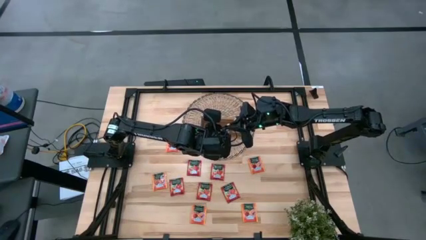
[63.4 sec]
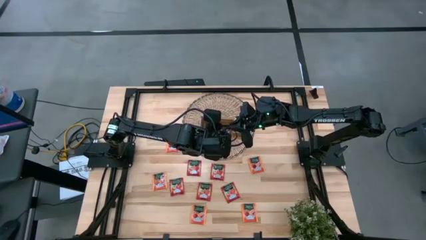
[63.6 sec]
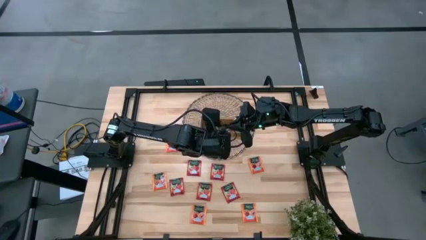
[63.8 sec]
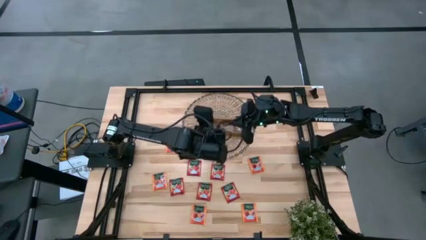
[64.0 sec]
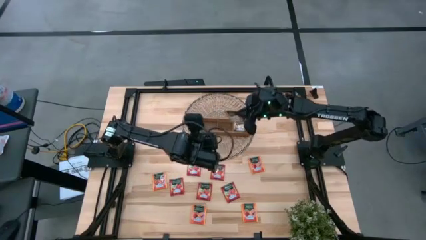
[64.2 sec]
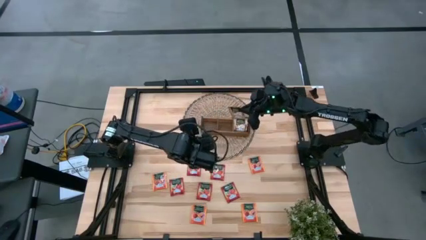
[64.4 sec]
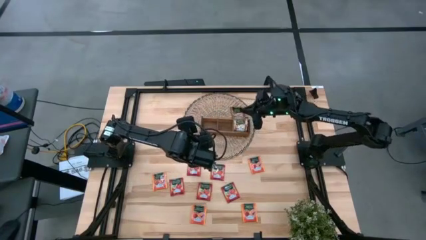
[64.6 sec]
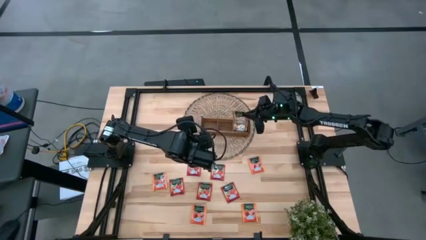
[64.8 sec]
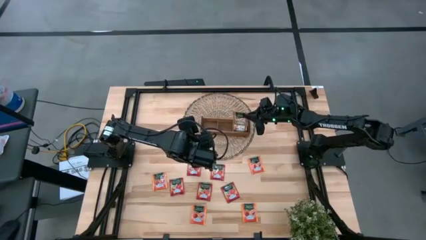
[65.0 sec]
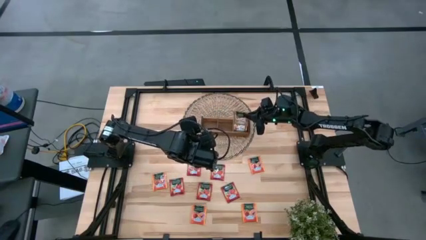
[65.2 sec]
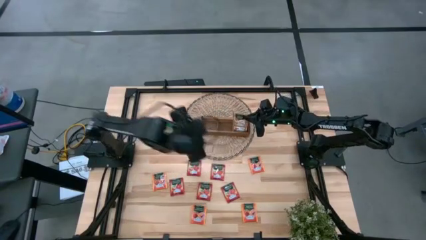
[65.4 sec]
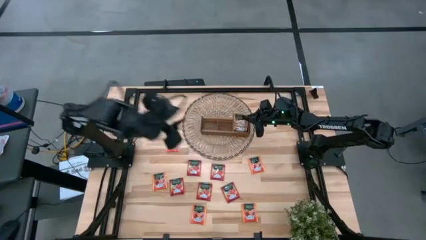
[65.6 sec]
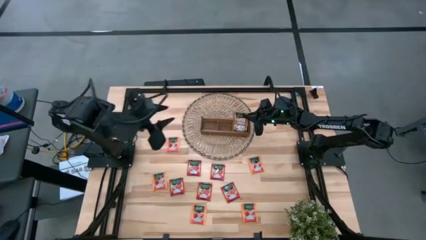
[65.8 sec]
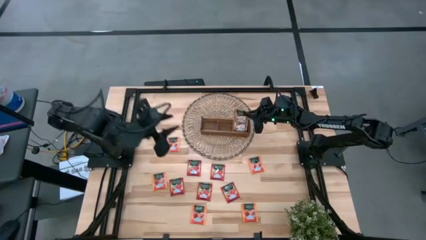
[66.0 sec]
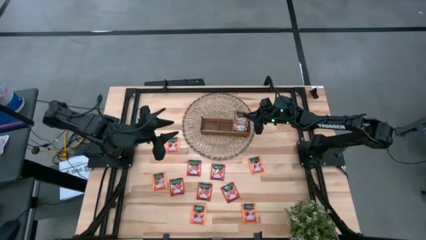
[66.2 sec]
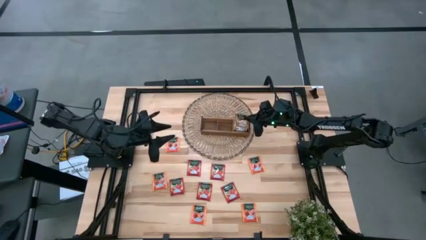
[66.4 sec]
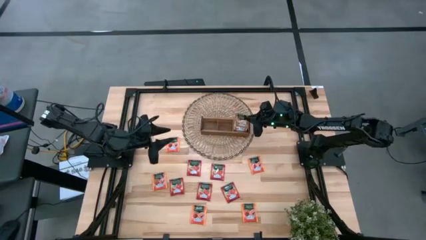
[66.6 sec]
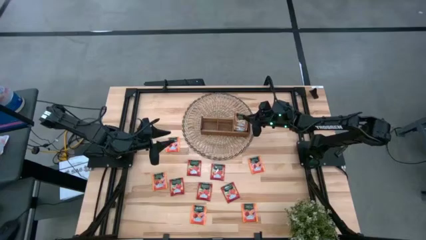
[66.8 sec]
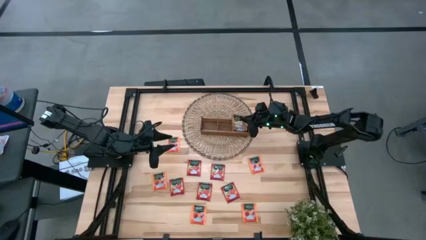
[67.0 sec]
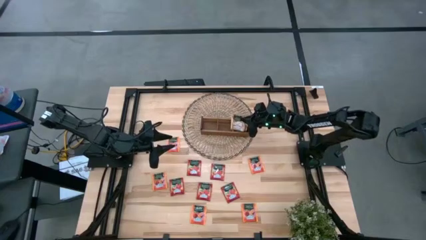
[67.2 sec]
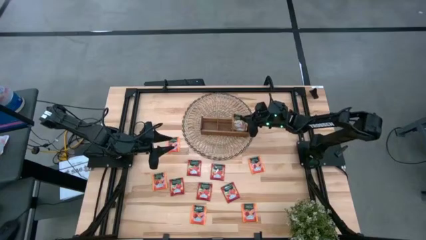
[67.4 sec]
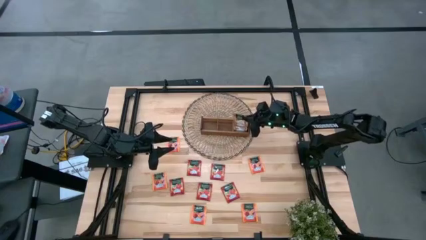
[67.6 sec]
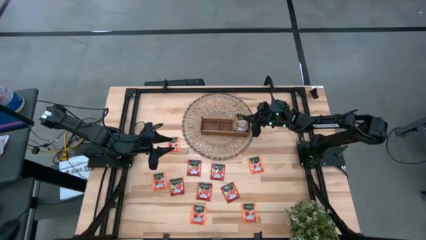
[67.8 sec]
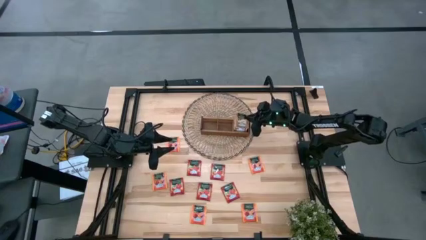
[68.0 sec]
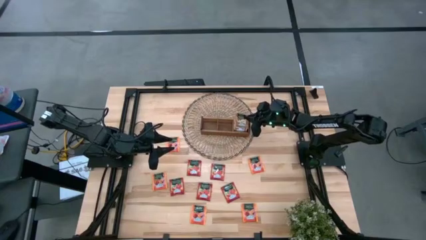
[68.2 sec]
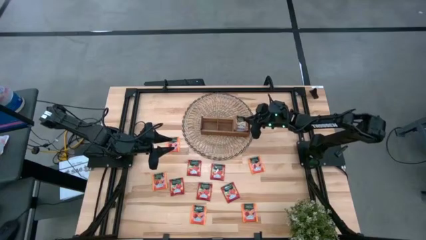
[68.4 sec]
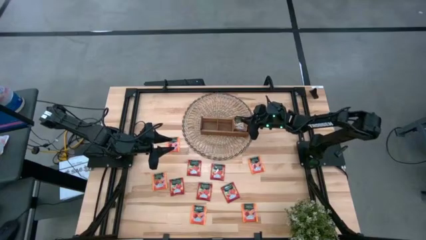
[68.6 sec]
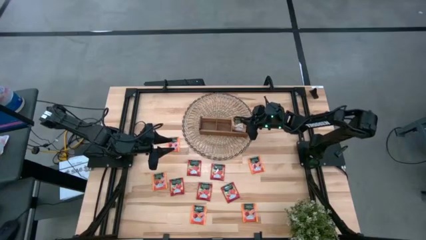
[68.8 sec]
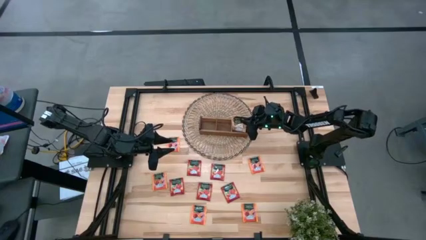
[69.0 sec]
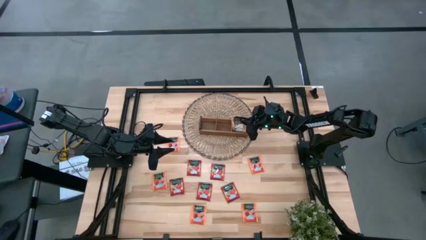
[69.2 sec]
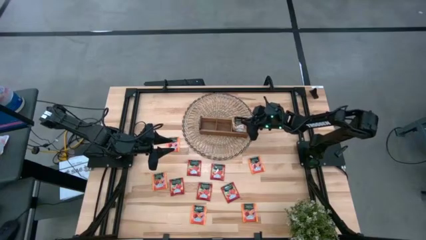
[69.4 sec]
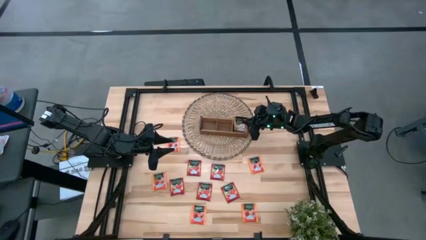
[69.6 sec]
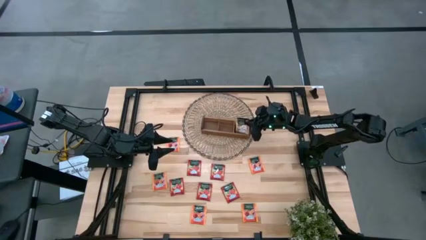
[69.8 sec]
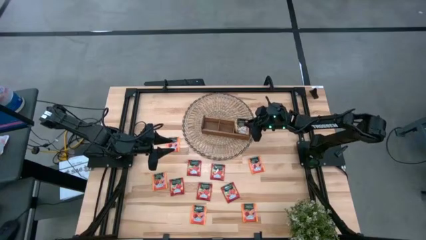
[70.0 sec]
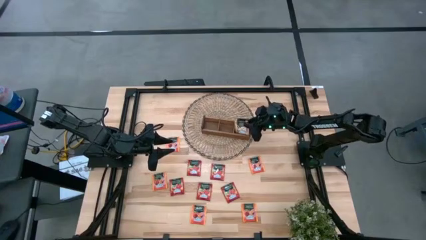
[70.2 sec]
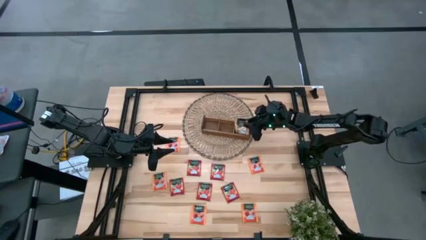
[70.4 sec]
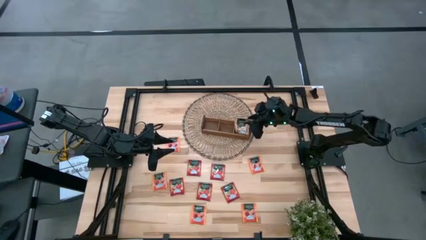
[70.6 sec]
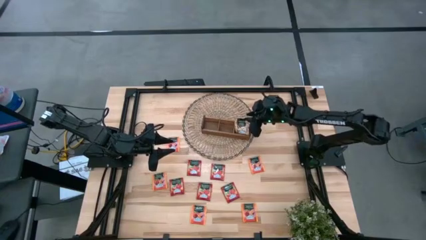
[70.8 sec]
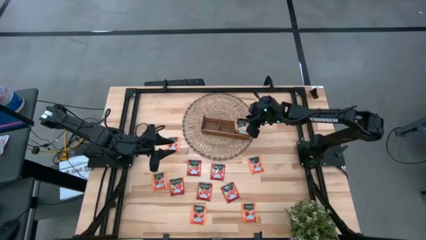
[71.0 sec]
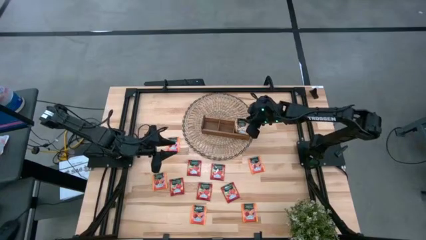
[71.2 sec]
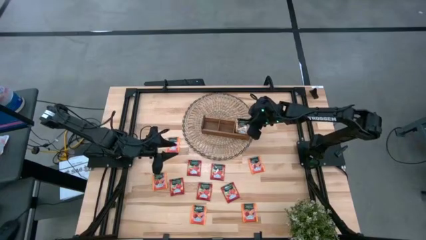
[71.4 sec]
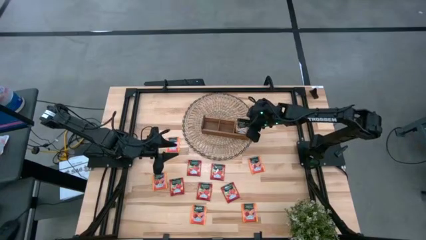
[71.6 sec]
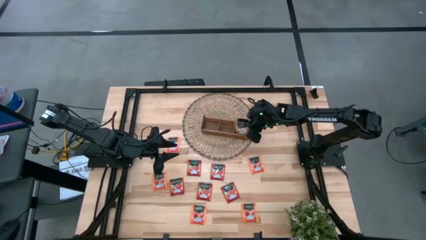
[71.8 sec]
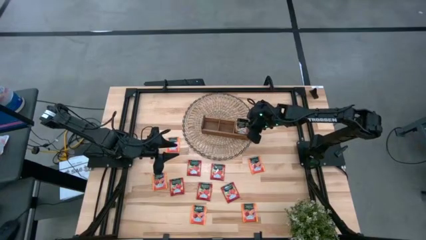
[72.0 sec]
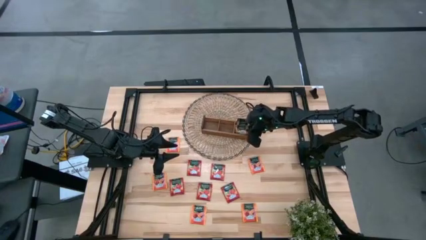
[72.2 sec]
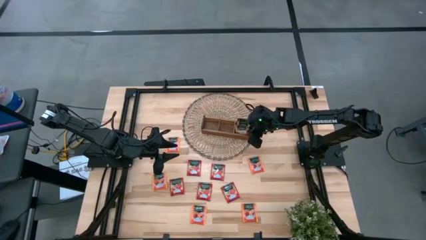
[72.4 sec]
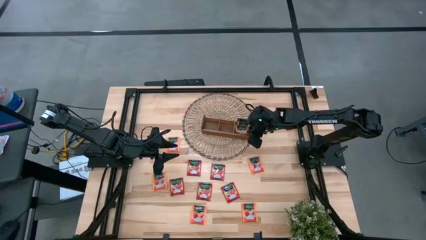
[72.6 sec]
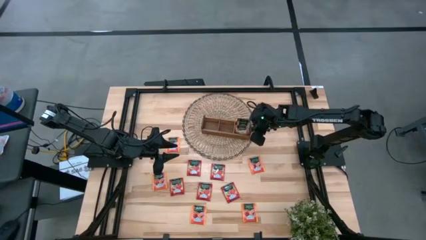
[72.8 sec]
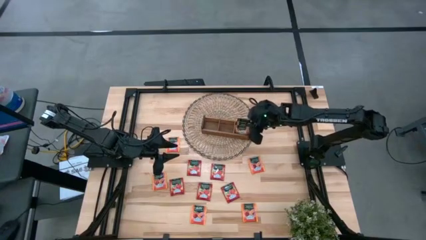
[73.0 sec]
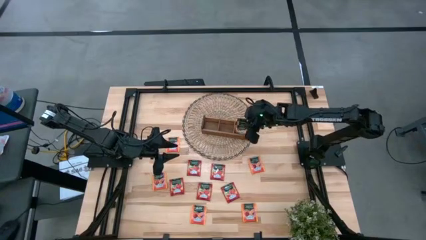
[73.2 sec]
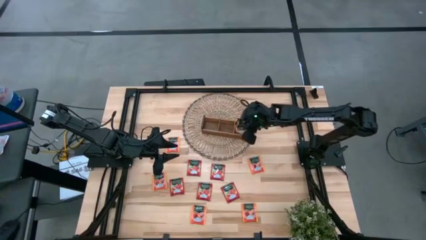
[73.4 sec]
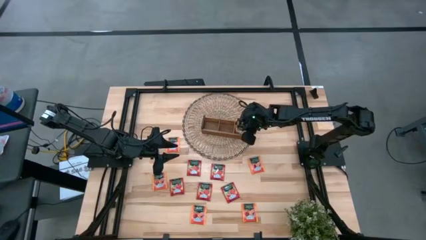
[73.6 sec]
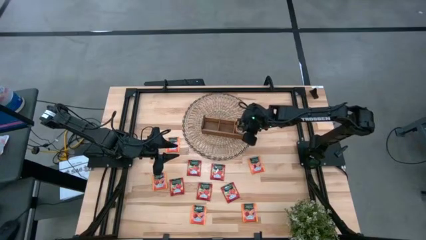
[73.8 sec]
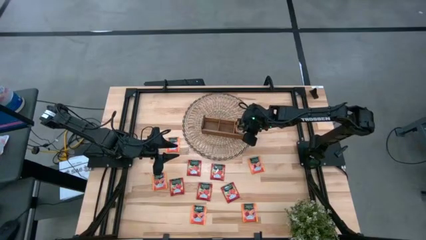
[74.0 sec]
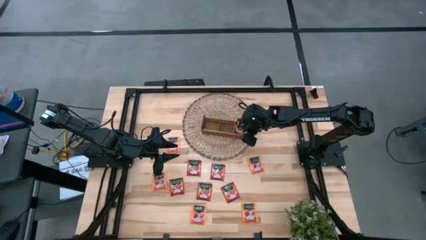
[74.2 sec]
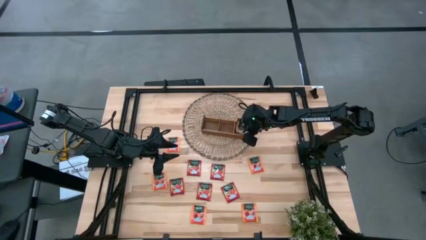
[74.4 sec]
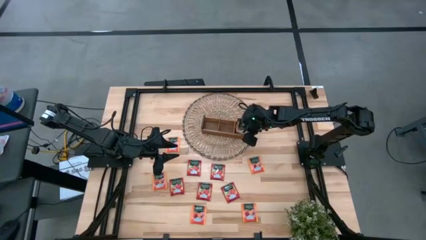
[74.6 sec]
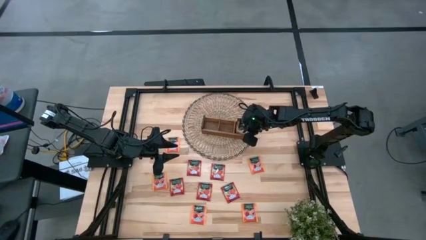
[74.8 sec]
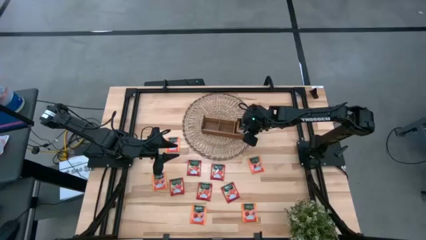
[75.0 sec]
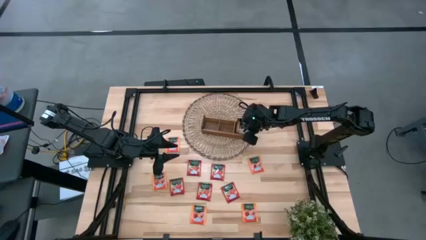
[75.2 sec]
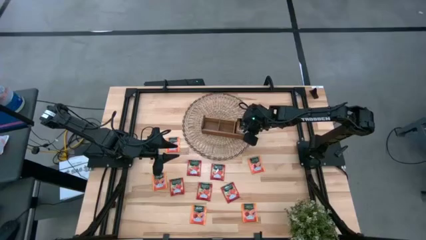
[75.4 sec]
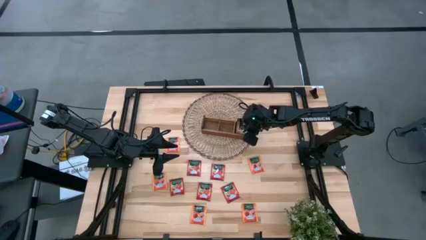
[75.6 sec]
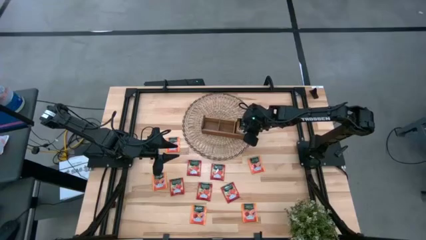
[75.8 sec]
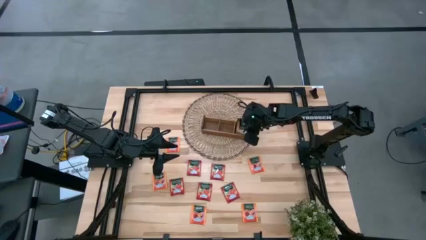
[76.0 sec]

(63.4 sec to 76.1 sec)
Task: Pick & Place Tea
Put the brown tea bag into the right slot of the wooden organizer
